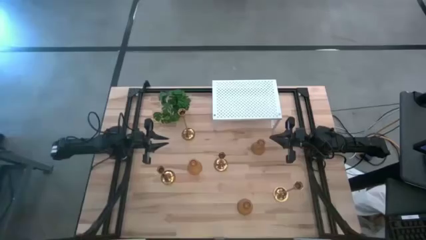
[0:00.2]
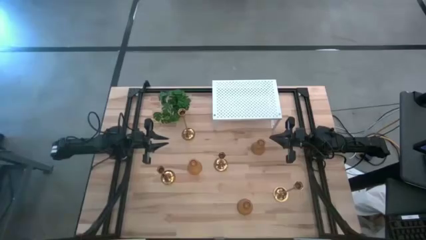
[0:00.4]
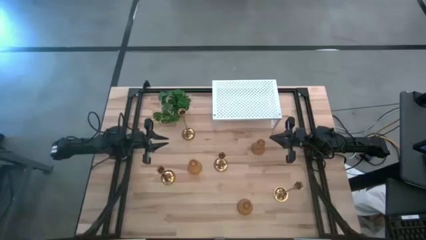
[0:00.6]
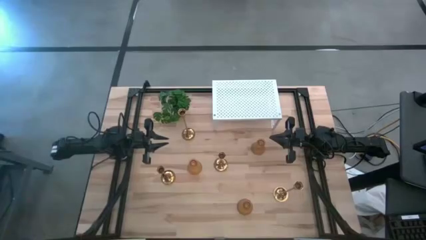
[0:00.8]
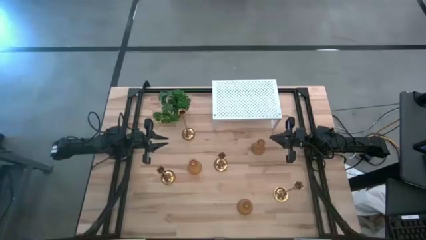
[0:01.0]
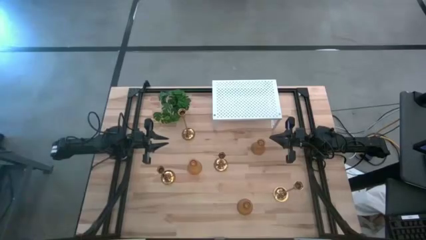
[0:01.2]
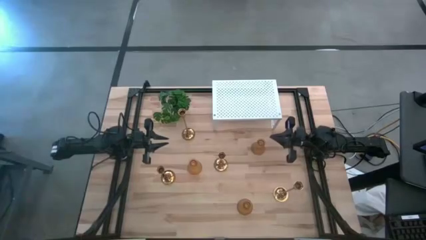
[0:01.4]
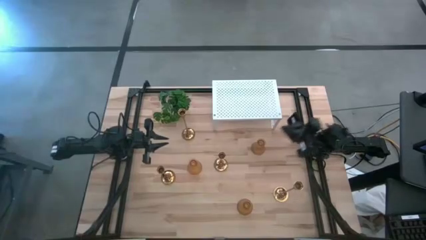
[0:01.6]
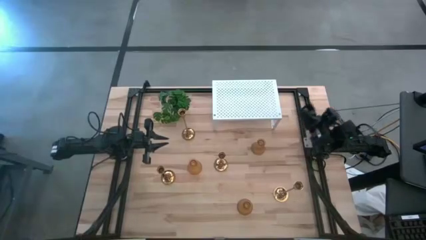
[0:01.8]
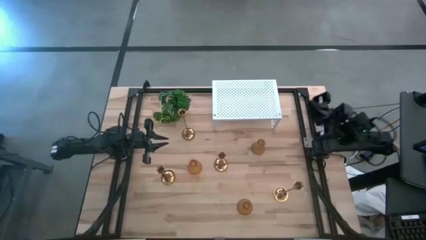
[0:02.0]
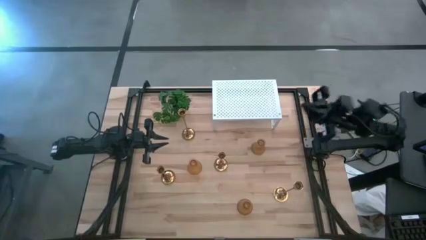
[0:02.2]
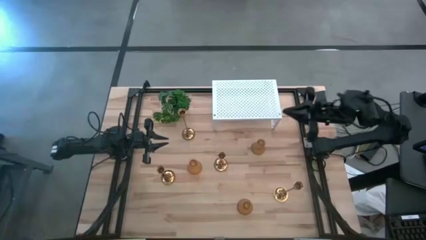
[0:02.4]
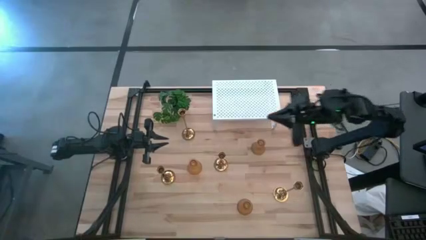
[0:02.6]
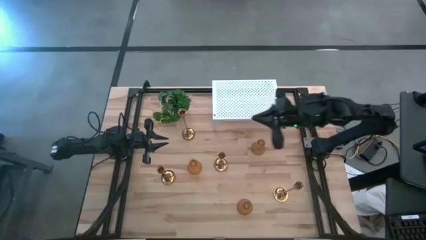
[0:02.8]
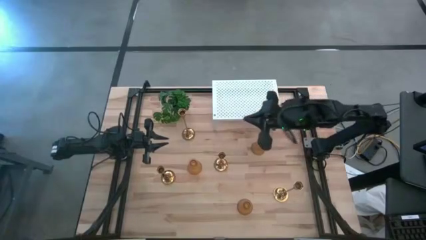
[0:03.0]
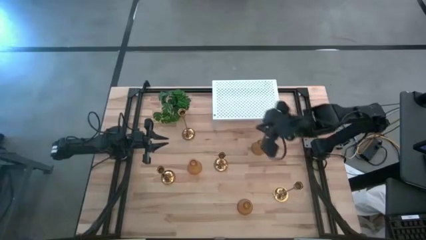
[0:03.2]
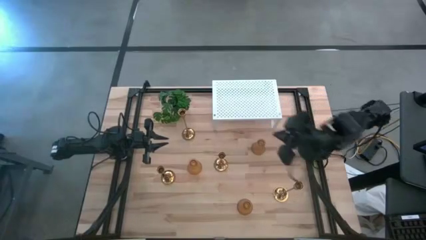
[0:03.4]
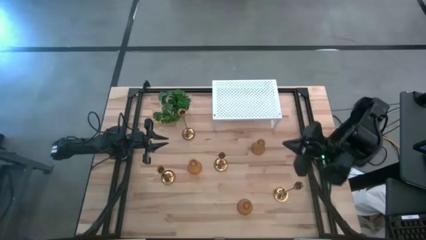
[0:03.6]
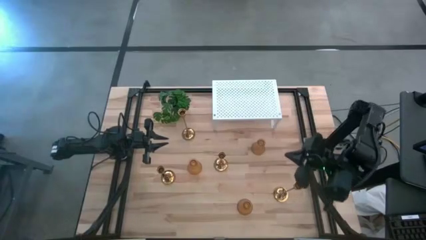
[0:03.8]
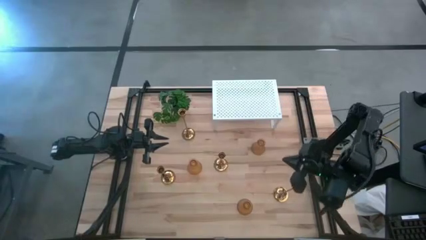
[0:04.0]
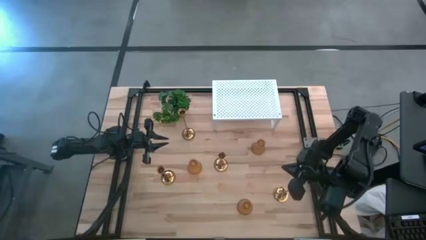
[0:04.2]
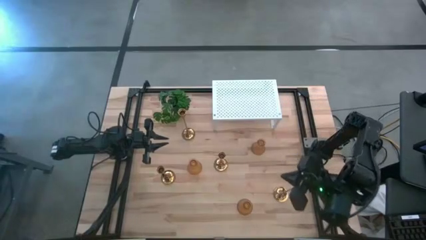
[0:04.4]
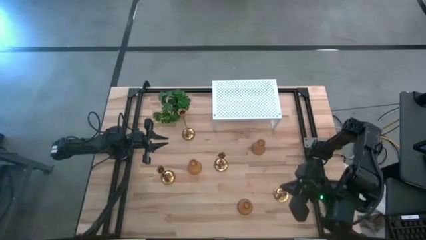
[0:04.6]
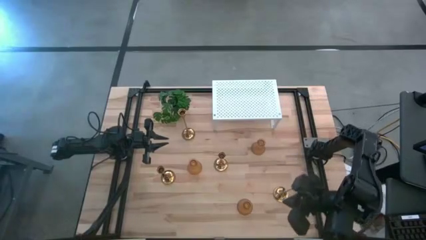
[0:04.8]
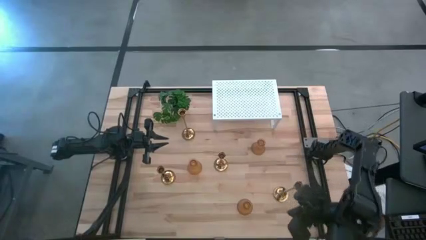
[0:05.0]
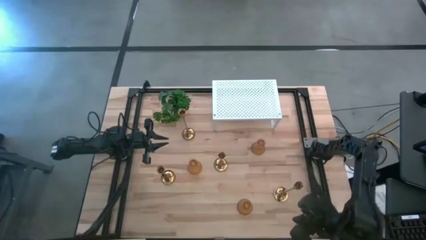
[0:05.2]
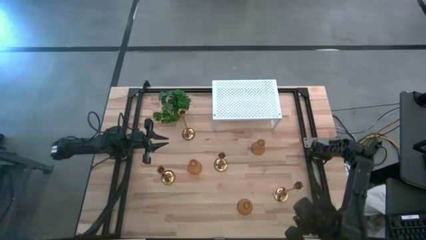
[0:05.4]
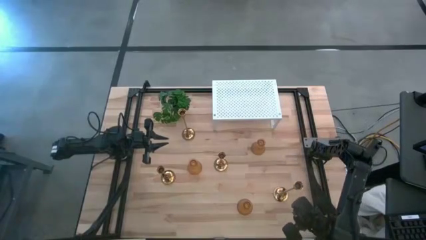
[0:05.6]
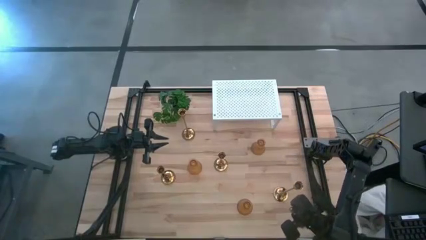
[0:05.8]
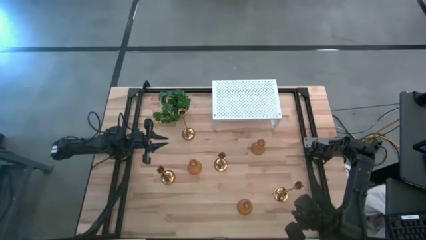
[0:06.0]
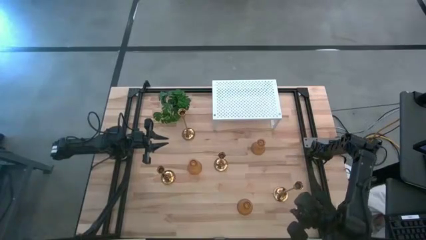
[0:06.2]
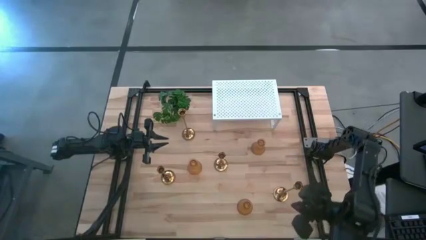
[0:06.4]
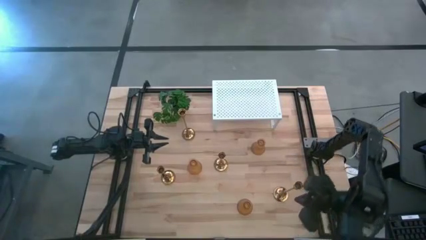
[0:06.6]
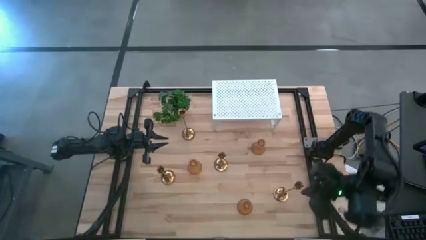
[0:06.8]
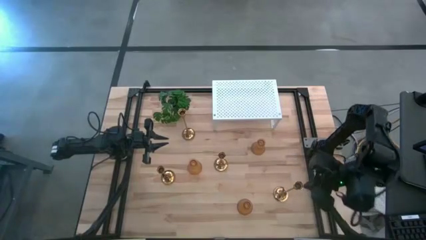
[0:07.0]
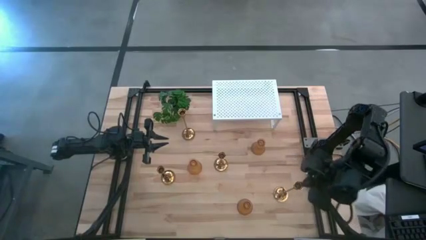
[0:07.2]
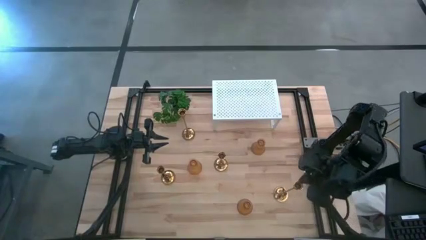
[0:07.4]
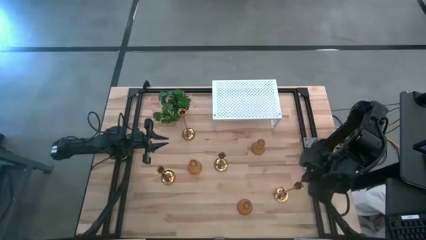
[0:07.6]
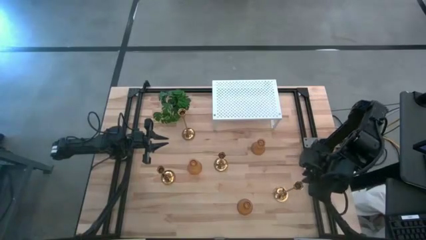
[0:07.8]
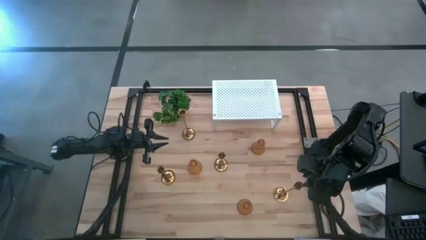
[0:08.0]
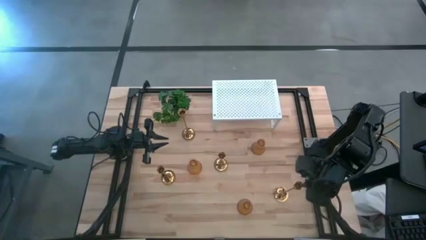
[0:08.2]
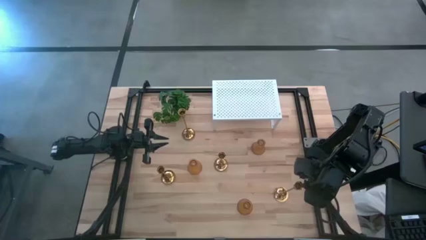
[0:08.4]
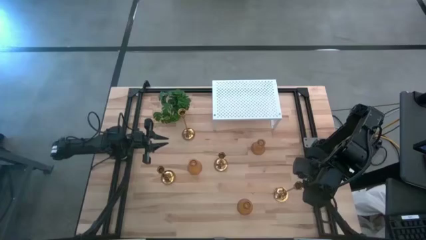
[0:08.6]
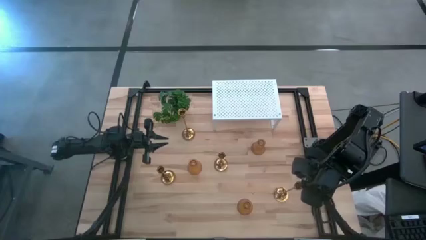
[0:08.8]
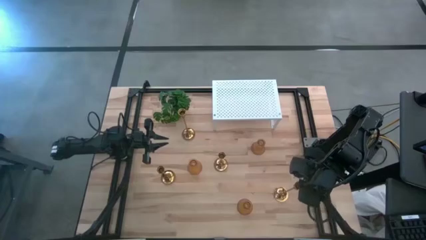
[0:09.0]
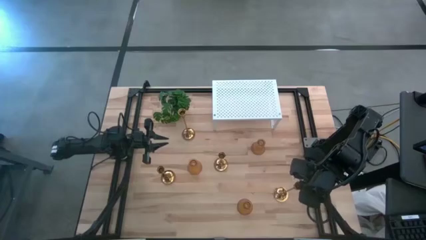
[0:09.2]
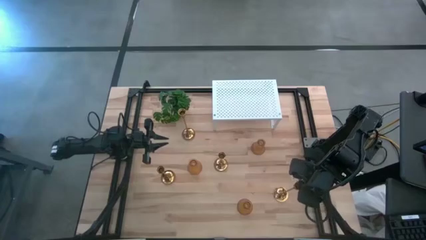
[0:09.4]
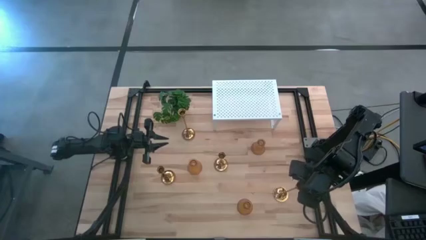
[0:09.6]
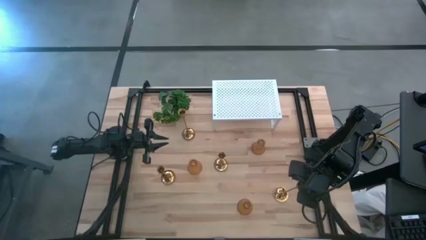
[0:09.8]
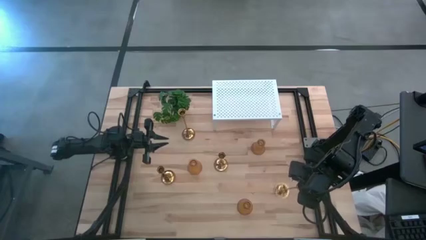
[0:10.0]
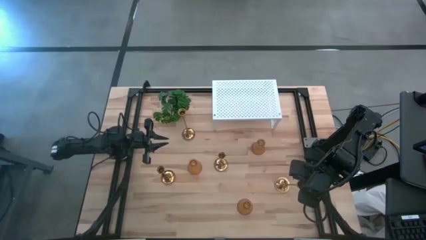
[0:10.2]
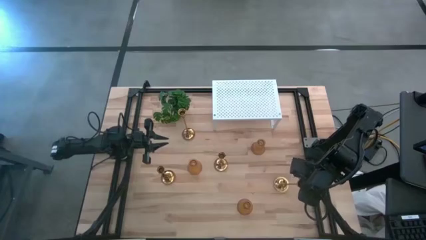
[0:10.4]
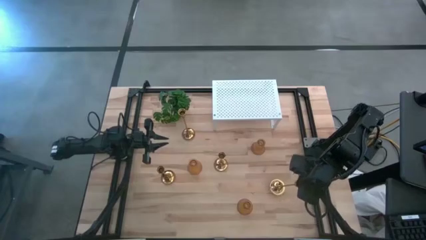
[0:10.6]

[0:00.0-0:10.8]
Task: Pick & Place candle stick holders
Put the bottom right gold candle holder on the shelf
